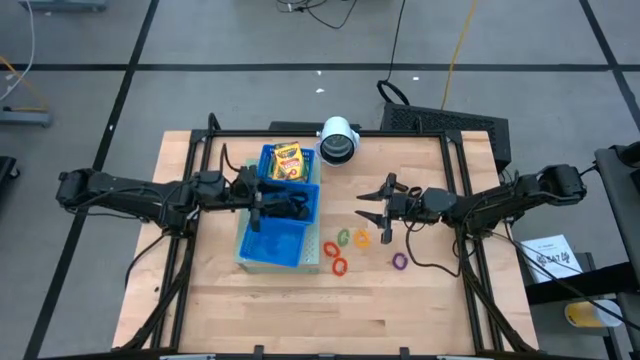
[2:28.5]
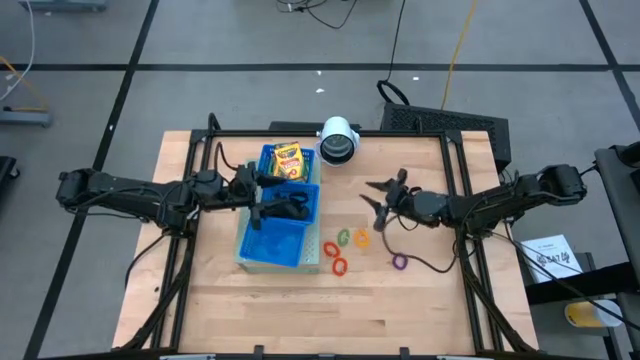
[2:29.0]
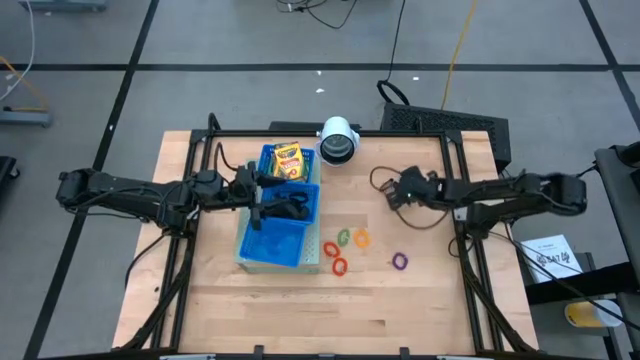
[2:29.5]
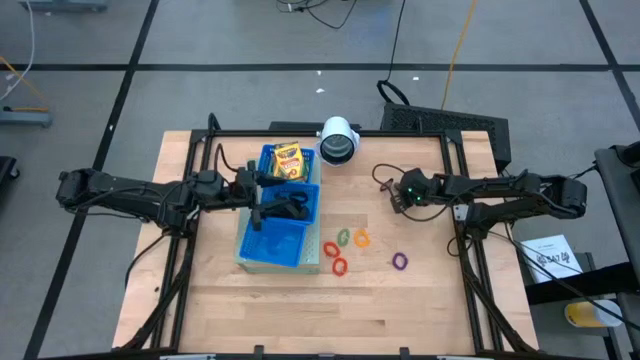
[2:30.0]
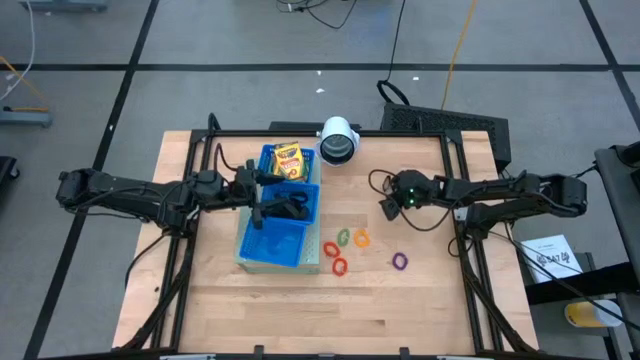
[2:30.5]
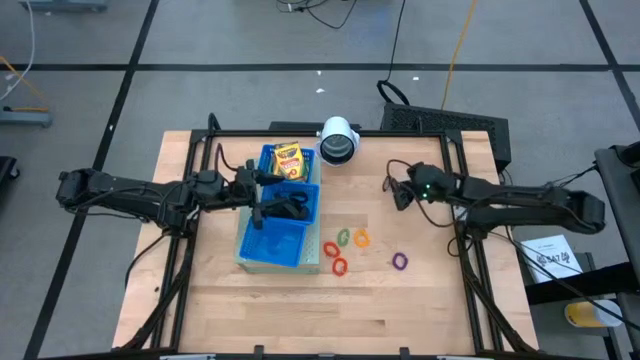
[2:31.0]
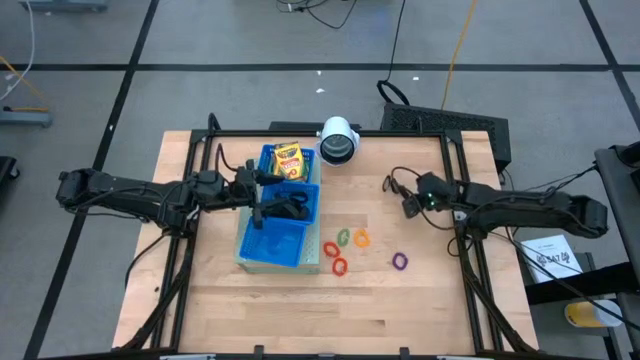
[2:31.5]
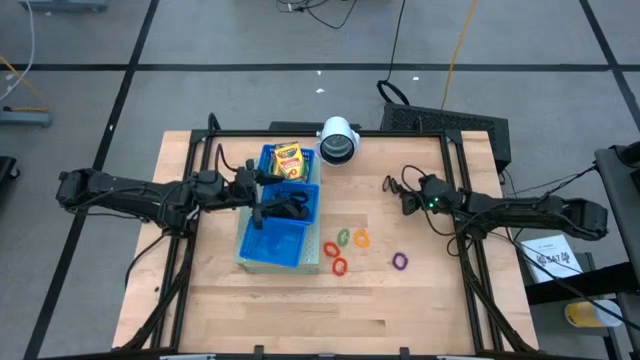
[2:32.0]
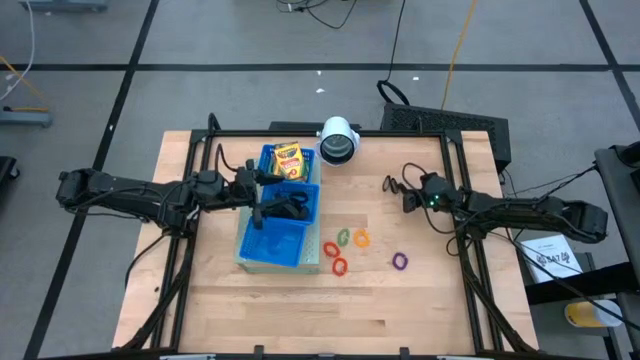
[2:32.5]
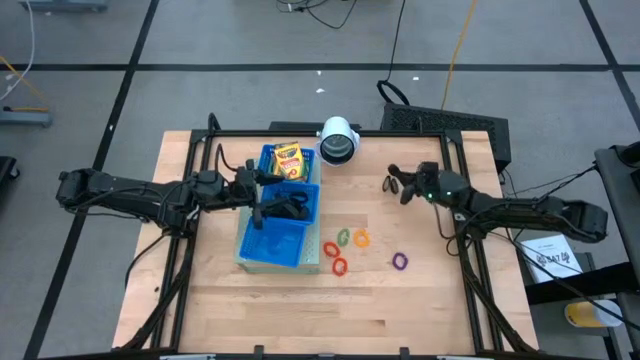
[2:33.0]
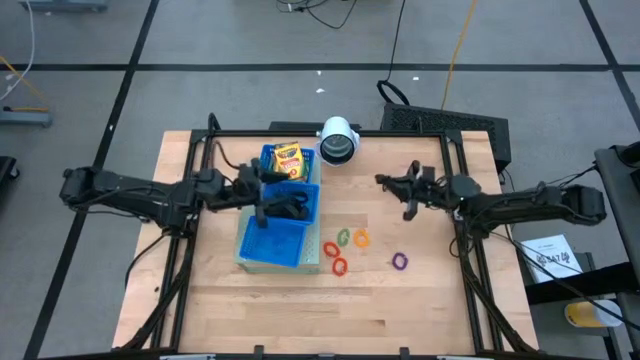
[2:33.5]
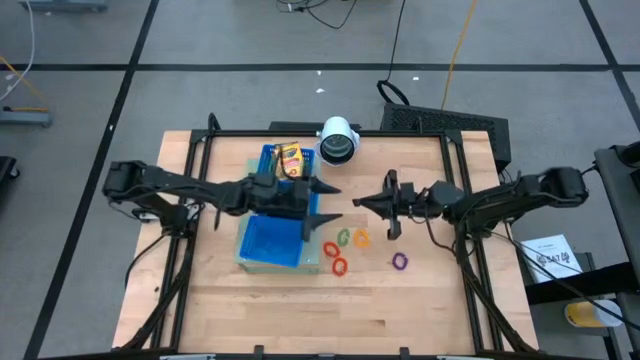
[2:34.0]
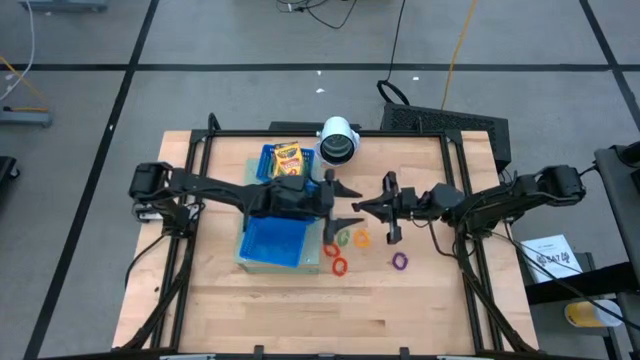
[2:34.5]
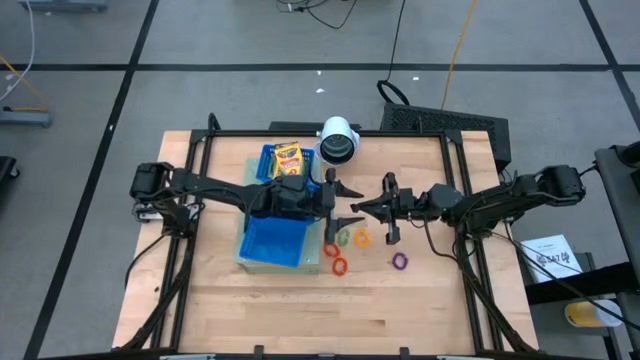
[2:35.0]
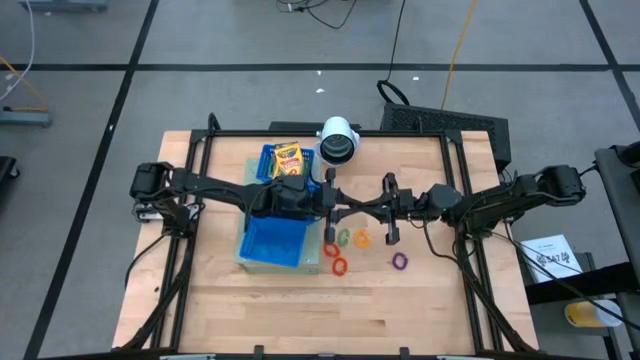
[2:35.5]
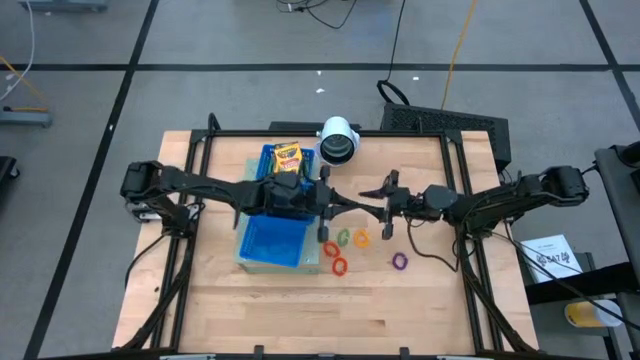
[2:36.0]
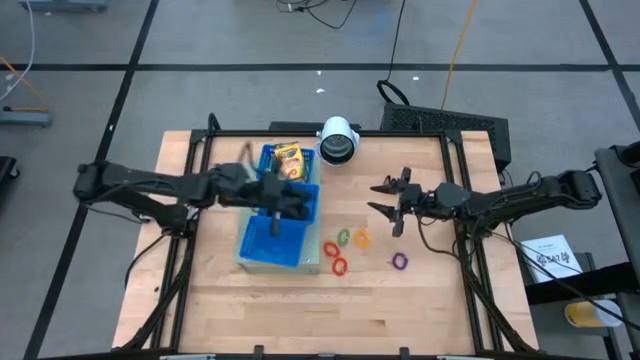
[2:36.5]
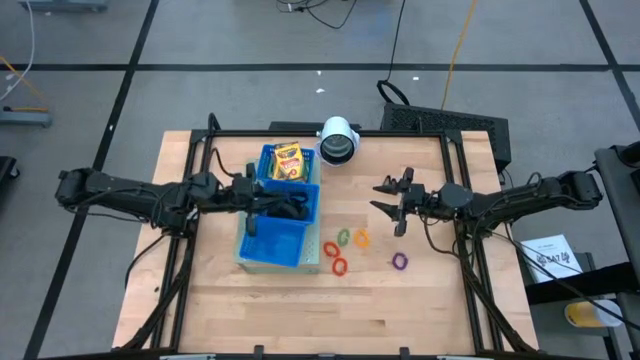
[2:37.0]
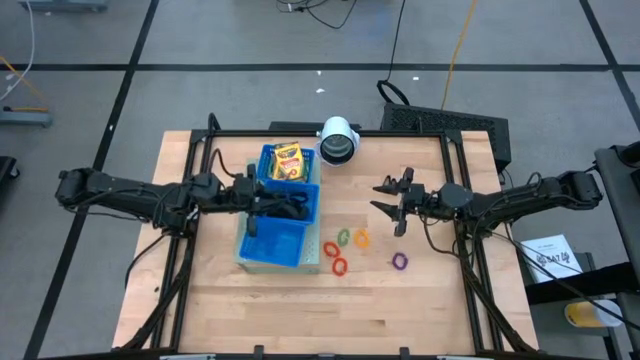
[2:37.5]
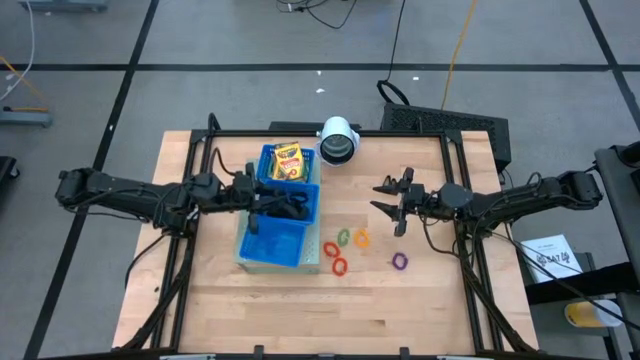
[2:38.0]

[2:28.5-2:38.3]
Task: Pick & Place Office Desk Supplies
Put the black rubber band into the middle blue bin on the shelf

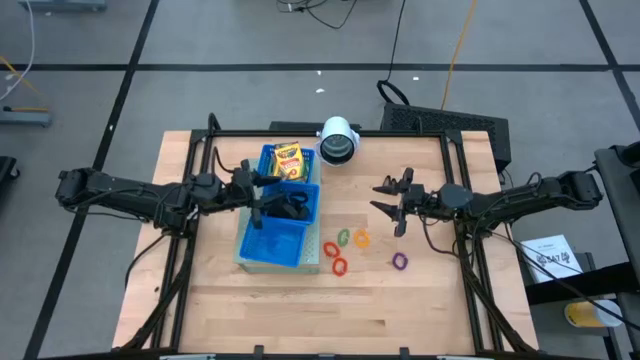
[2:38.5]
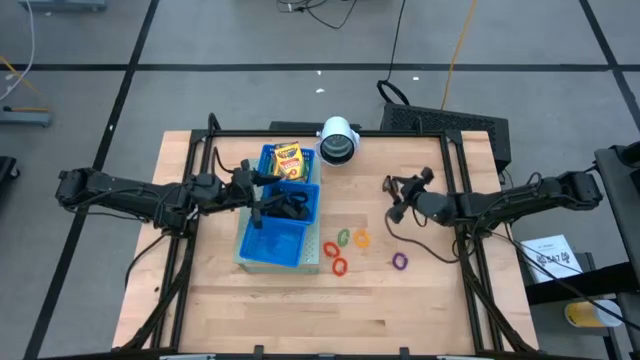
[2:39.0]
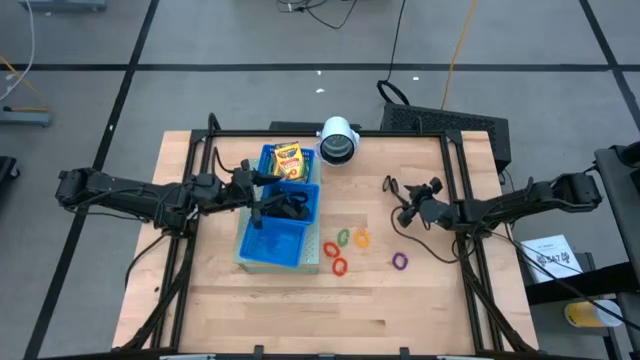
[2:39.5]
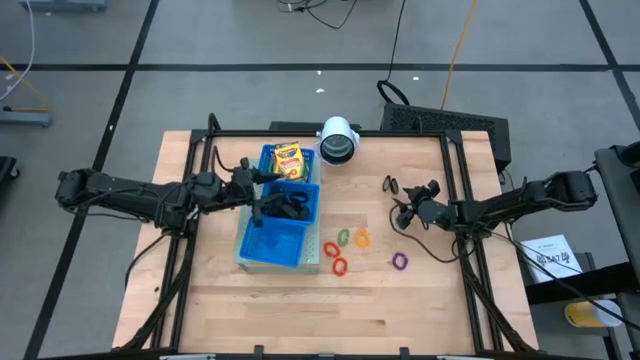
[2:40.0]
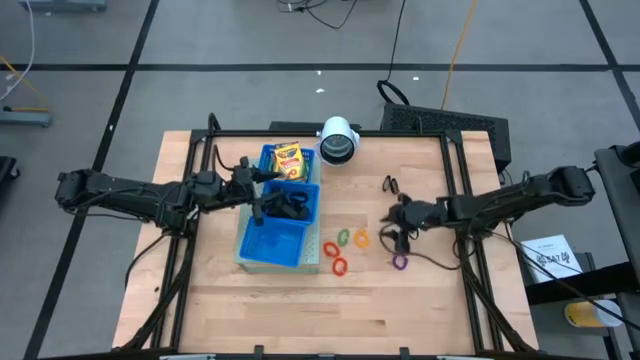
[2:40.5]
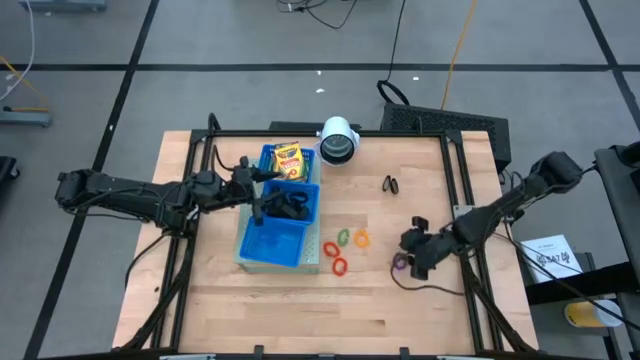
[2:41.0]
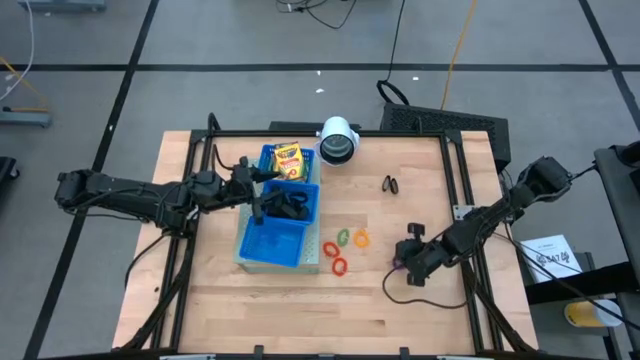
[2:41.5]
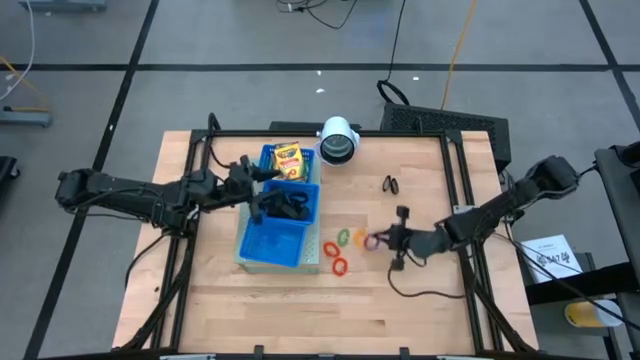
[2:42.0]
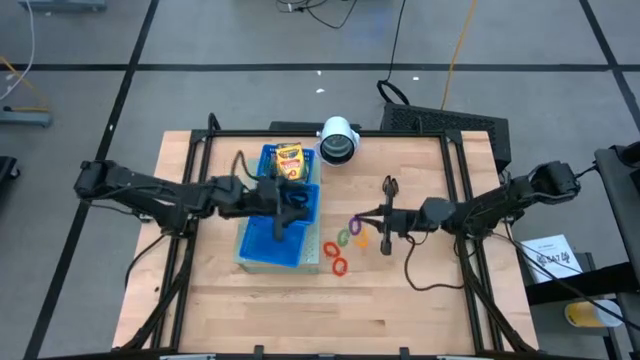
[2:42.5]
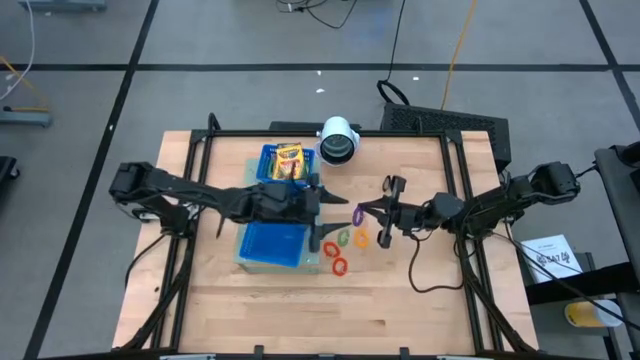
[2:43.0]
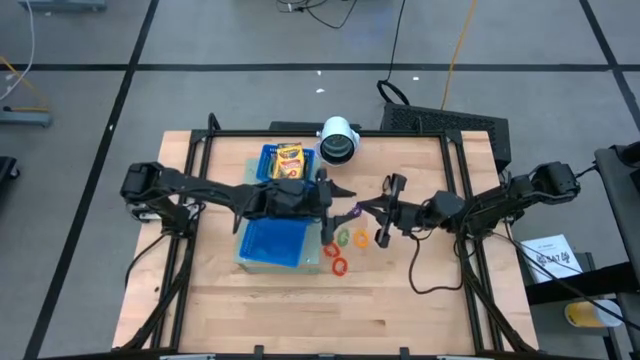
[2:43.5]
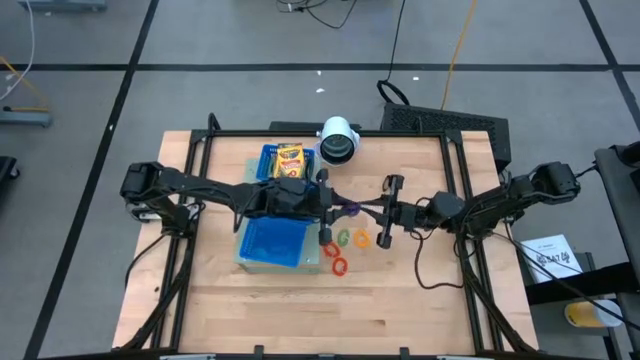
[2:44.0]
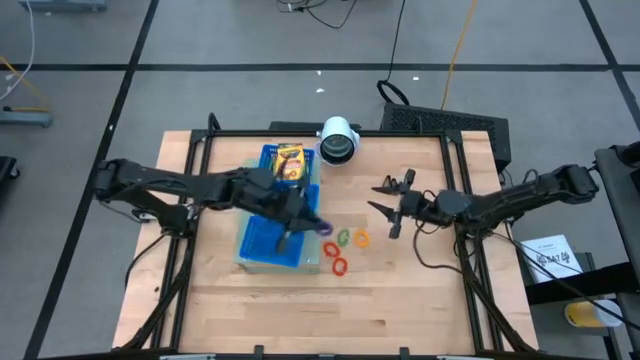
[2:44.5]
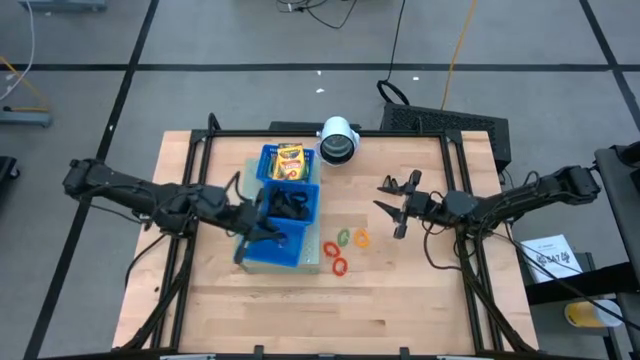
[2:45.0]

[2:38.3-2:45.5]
Put the violet spring rubber band into the bottom blue bin on the shelf

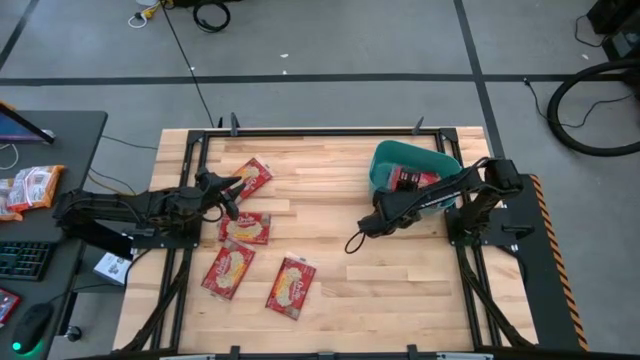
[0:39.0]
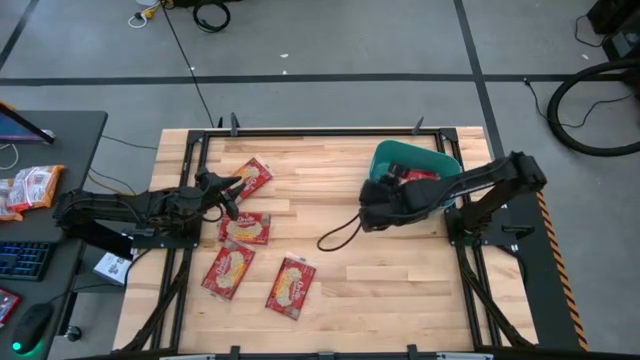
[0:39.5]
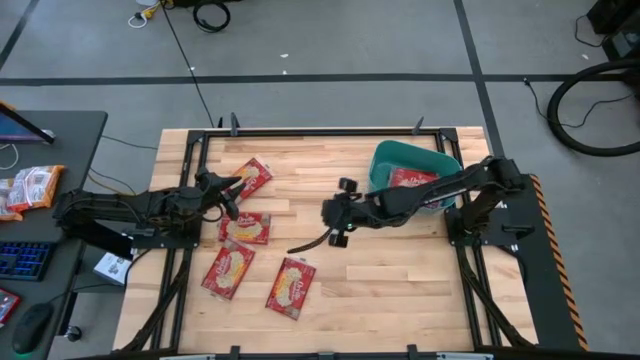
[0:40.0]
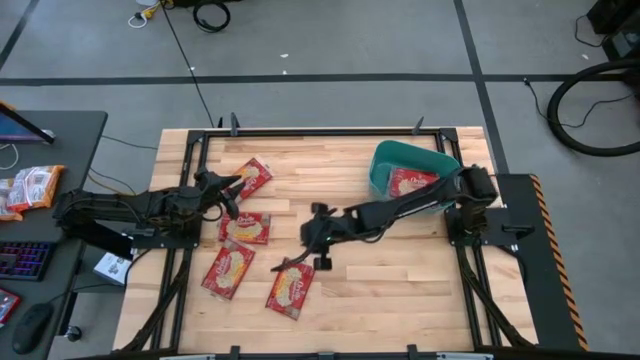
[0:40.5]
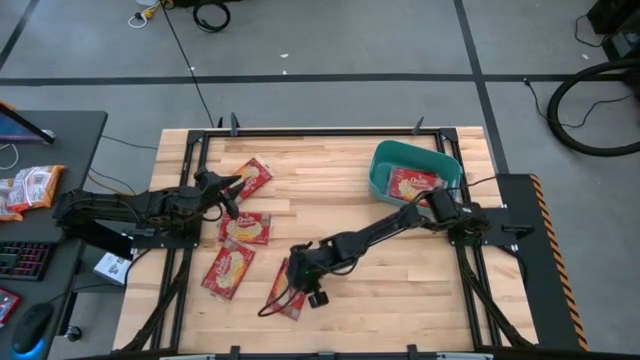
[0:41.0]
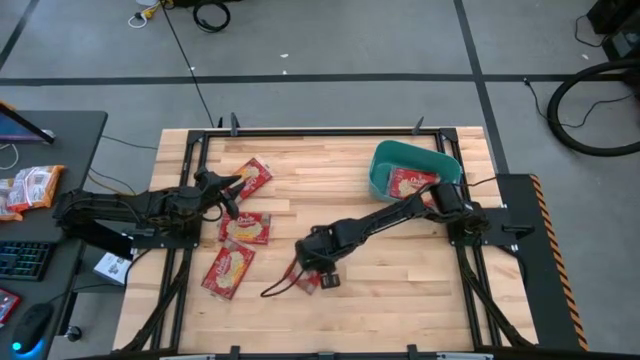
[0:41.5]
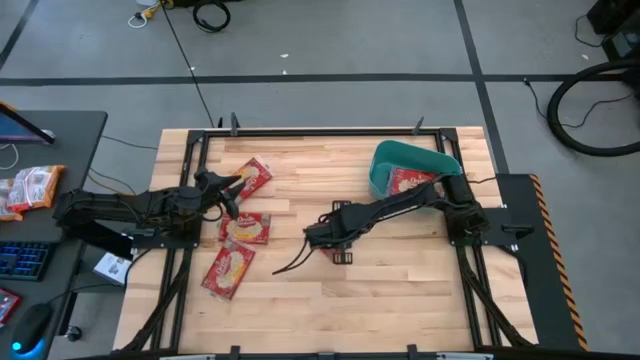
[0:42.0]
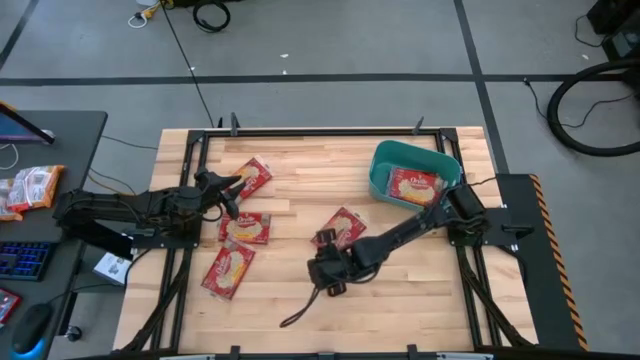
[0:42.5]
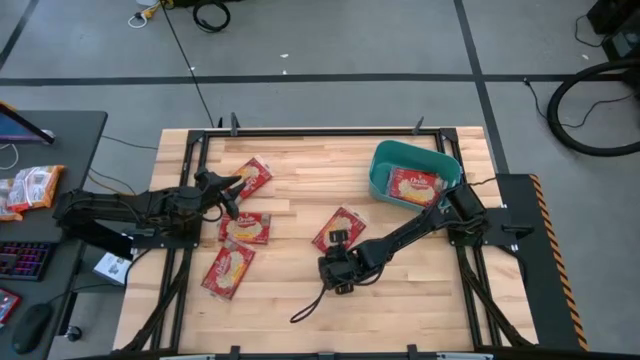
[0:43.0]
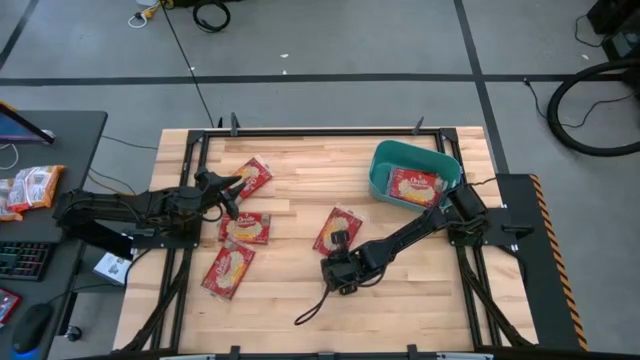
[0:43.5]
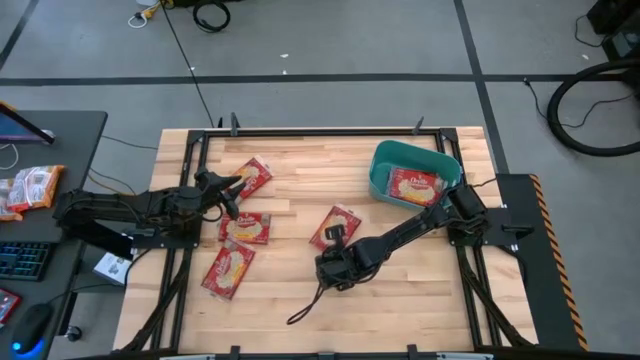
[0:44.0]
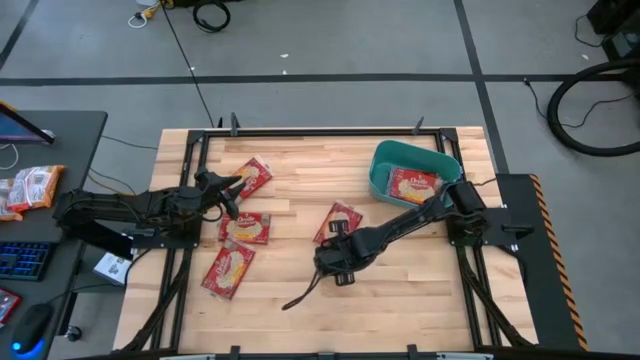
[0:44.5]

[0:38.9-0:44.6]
Task: Sort popcorn bags into baskets
Put the red popcorn bag into the green container
